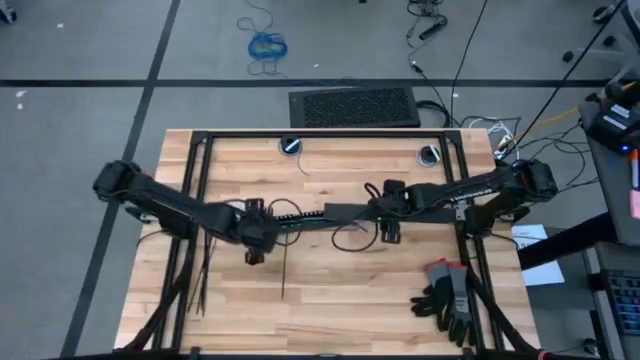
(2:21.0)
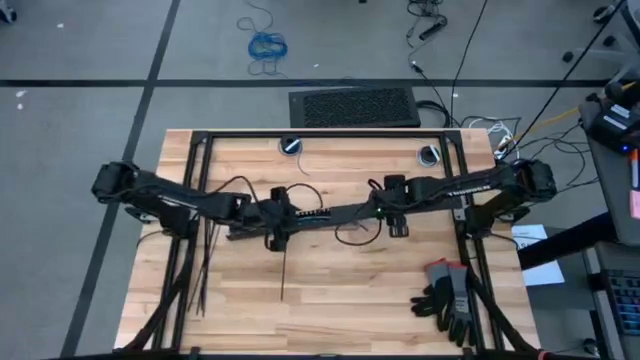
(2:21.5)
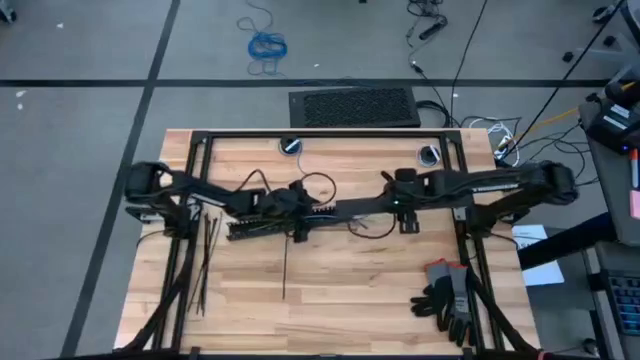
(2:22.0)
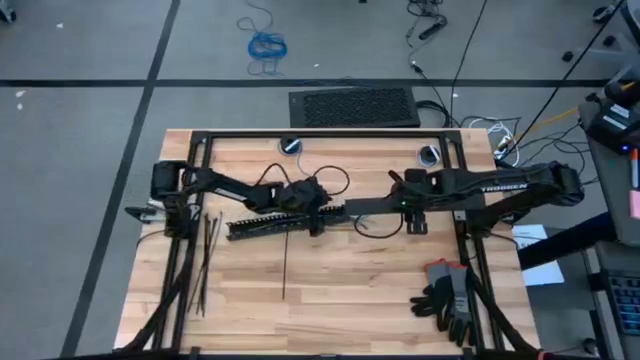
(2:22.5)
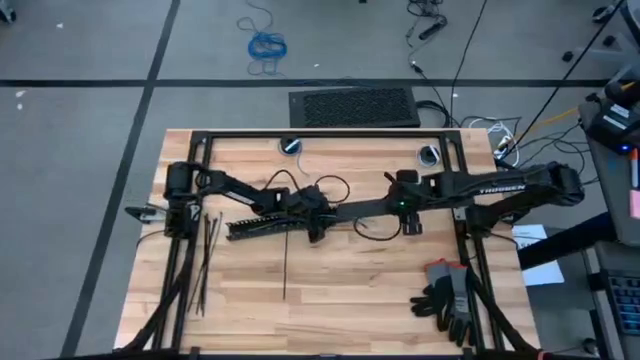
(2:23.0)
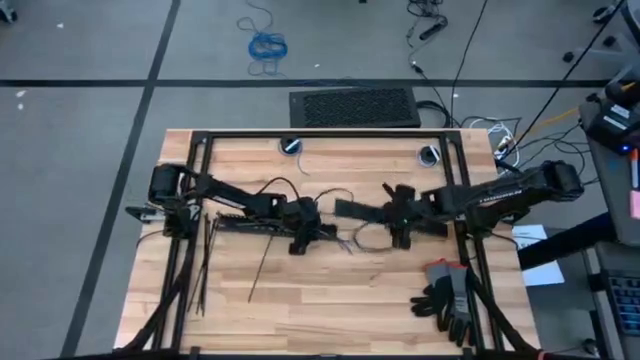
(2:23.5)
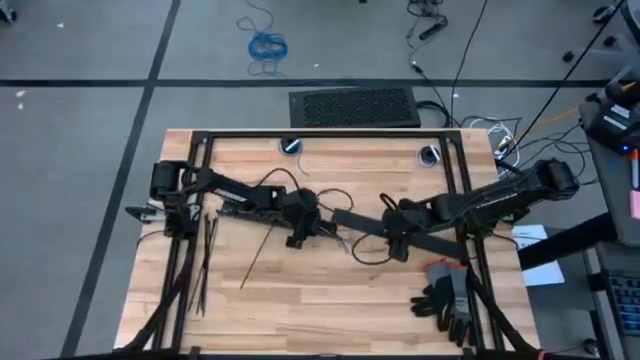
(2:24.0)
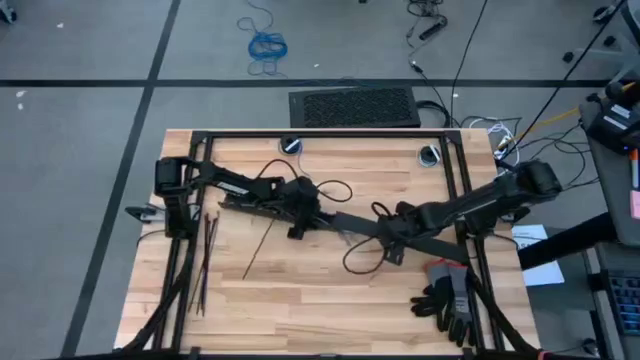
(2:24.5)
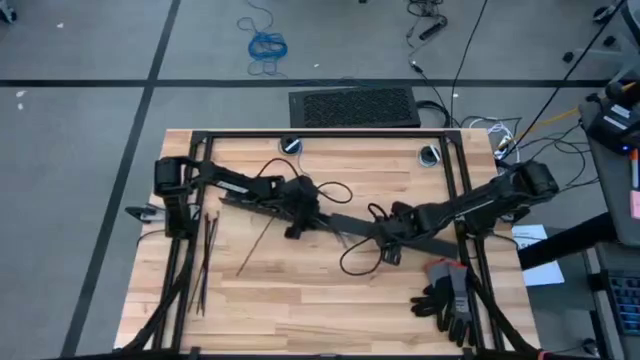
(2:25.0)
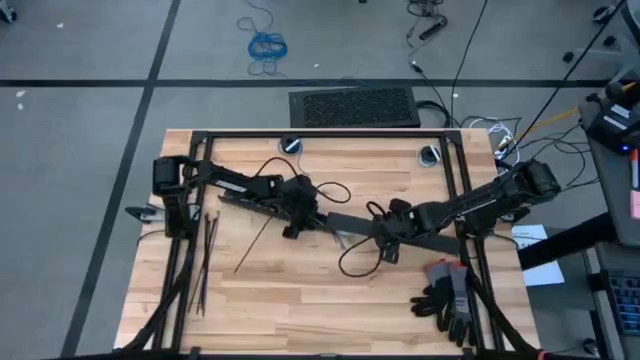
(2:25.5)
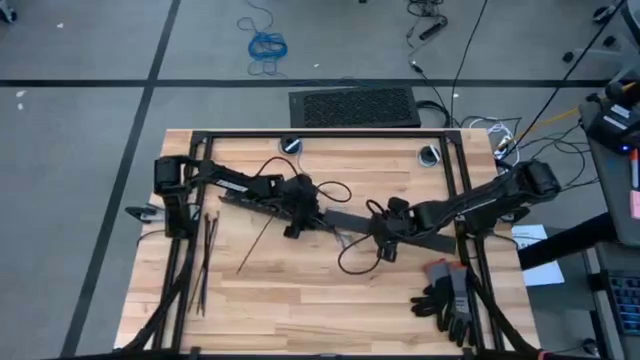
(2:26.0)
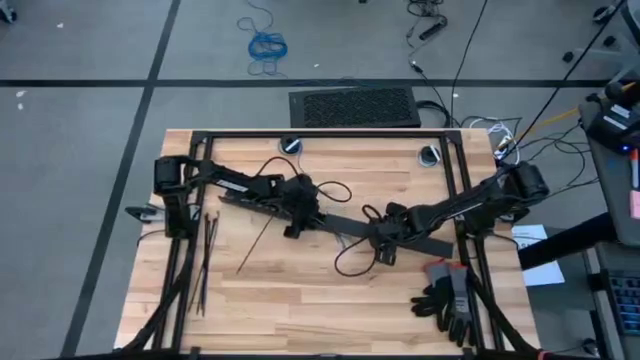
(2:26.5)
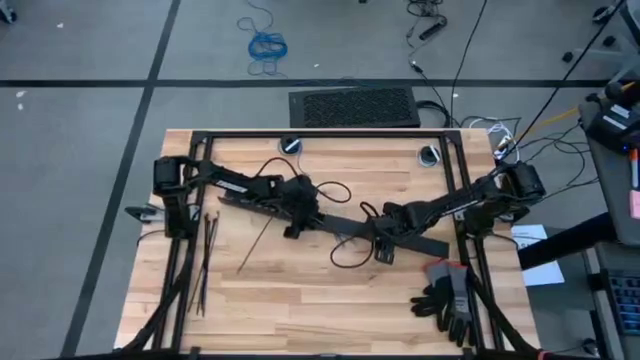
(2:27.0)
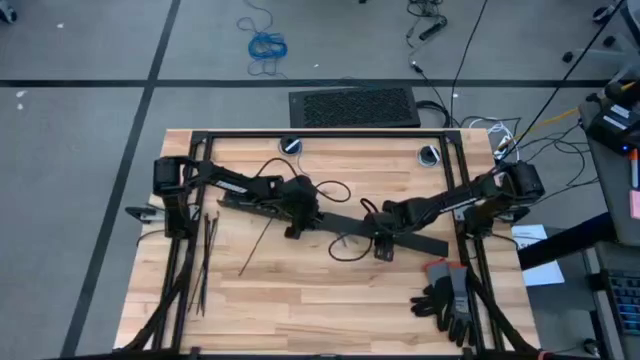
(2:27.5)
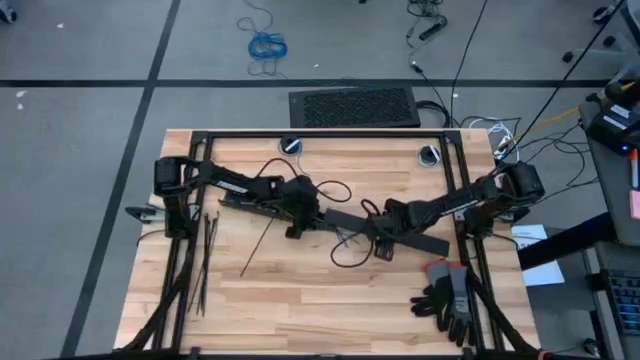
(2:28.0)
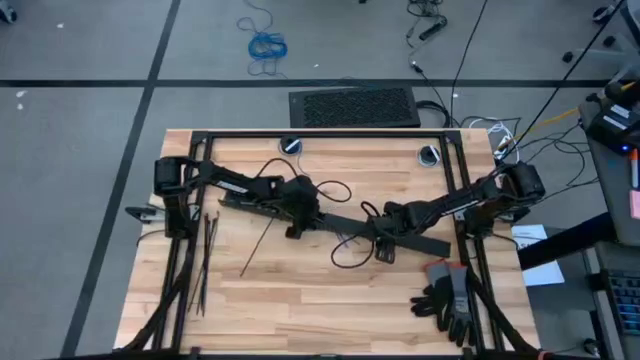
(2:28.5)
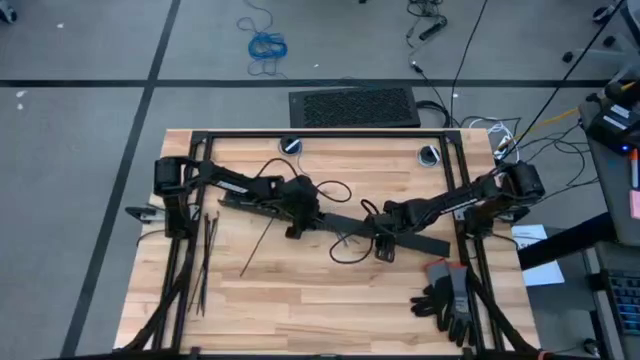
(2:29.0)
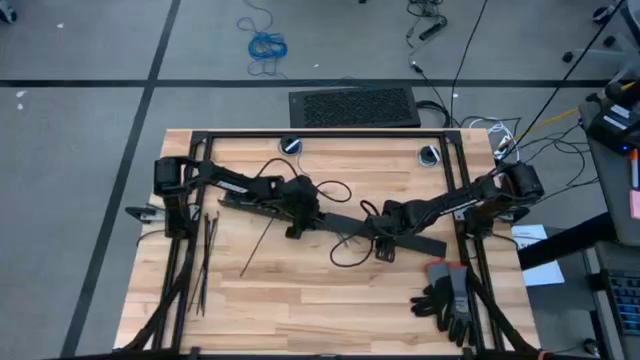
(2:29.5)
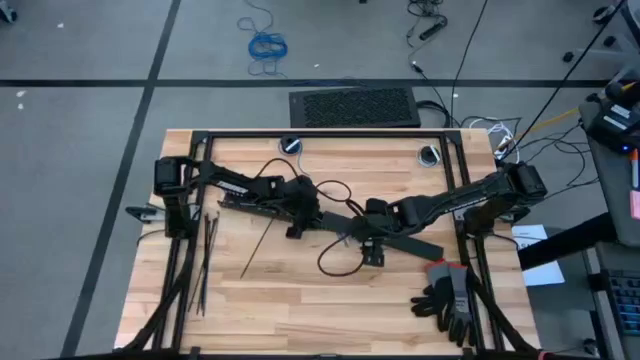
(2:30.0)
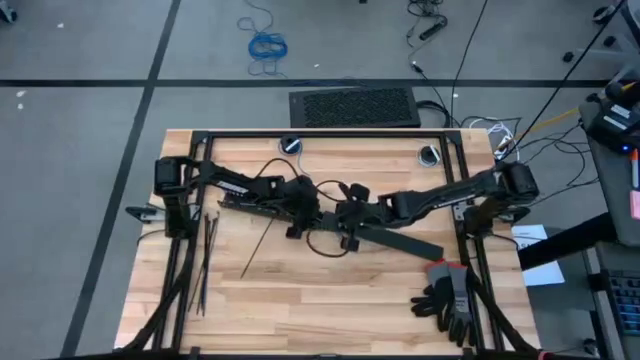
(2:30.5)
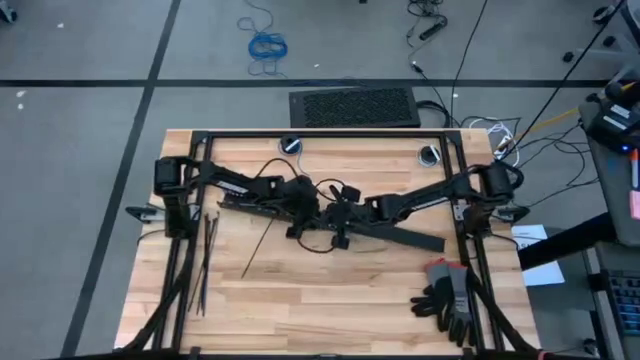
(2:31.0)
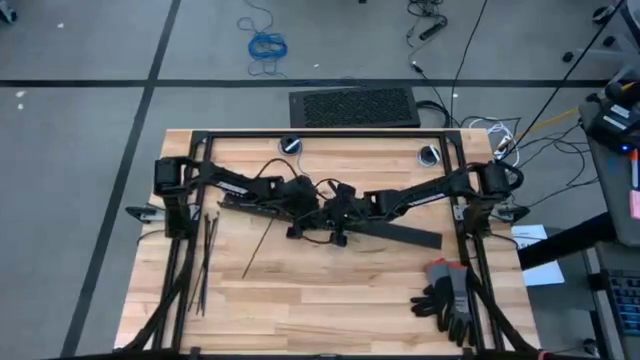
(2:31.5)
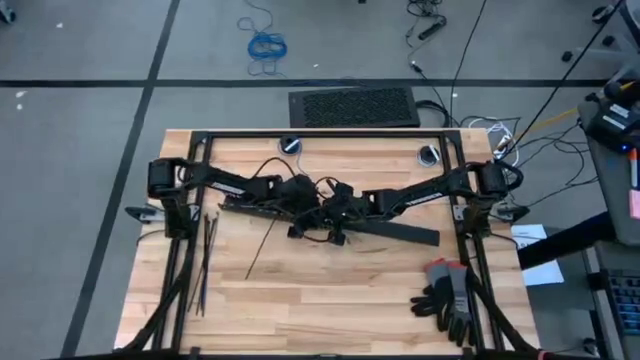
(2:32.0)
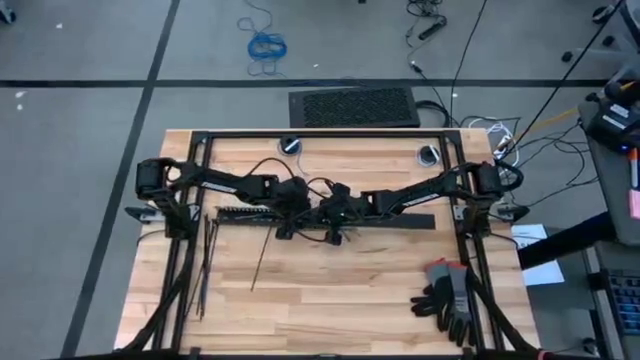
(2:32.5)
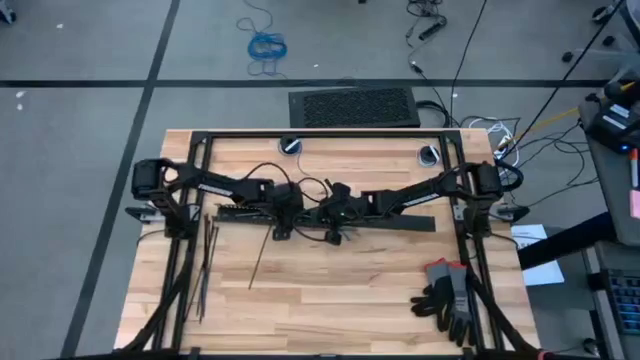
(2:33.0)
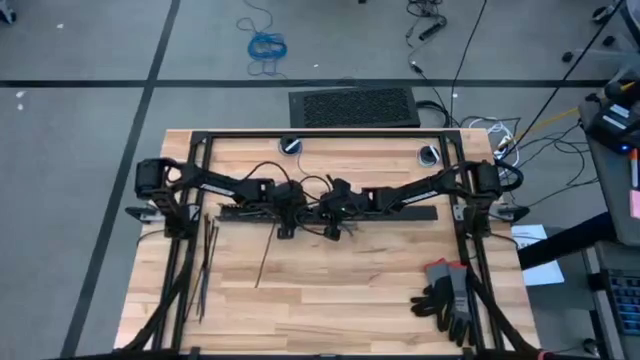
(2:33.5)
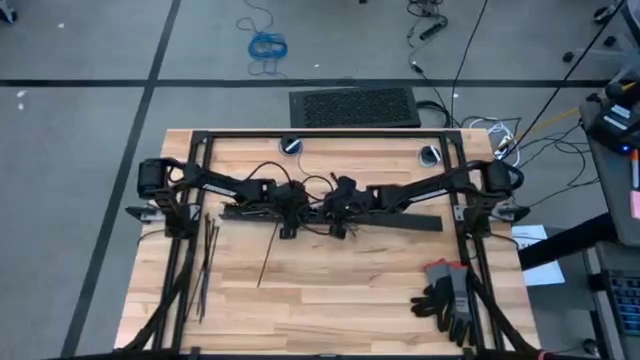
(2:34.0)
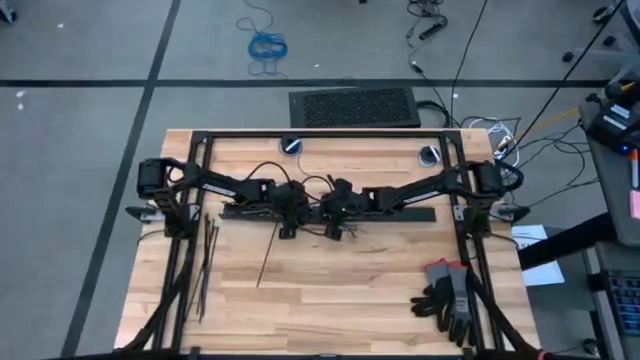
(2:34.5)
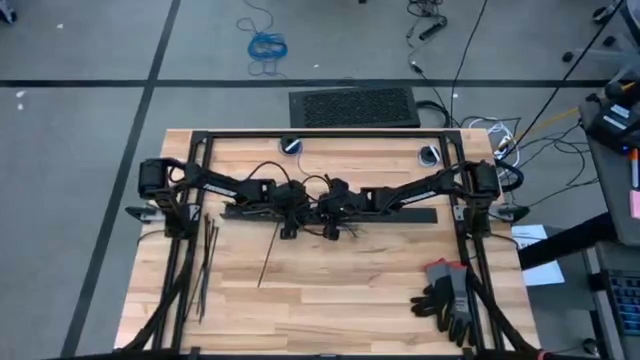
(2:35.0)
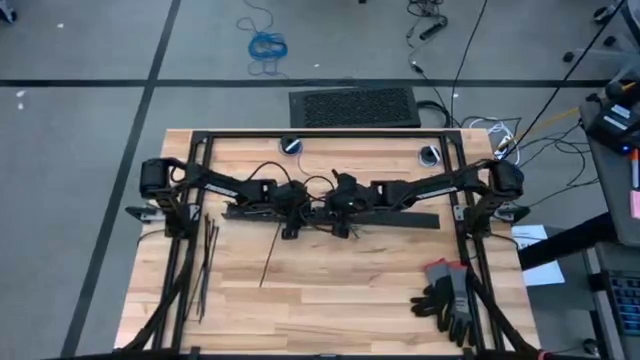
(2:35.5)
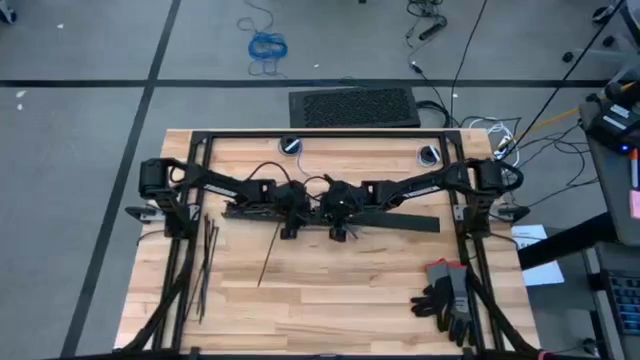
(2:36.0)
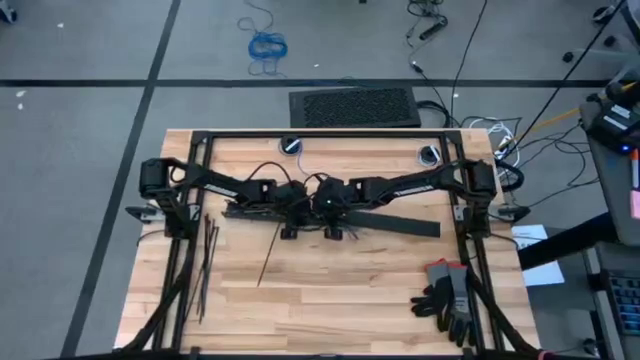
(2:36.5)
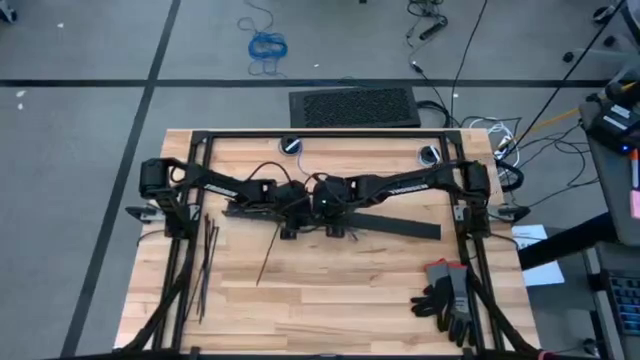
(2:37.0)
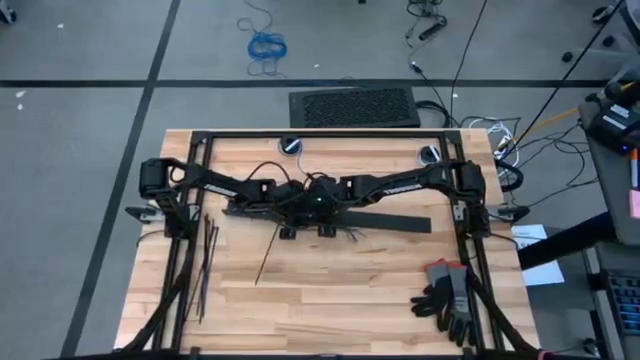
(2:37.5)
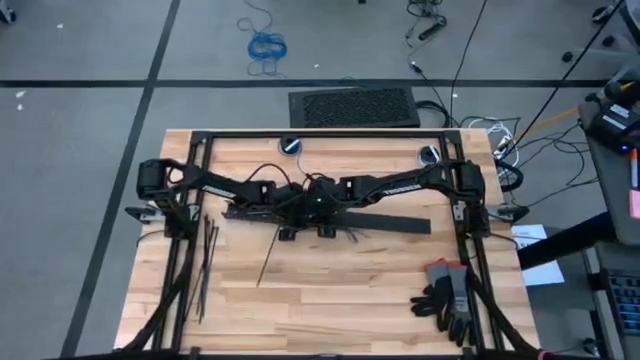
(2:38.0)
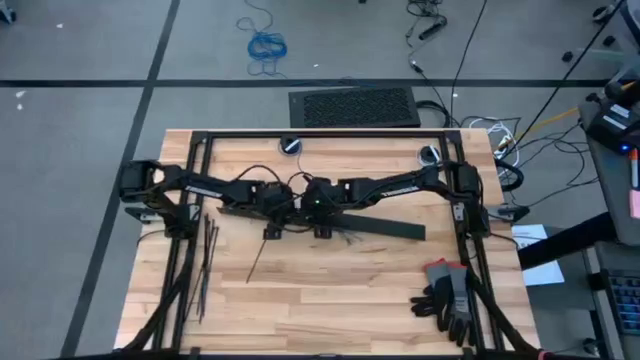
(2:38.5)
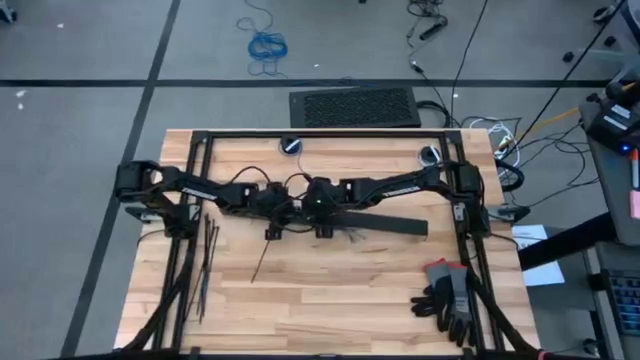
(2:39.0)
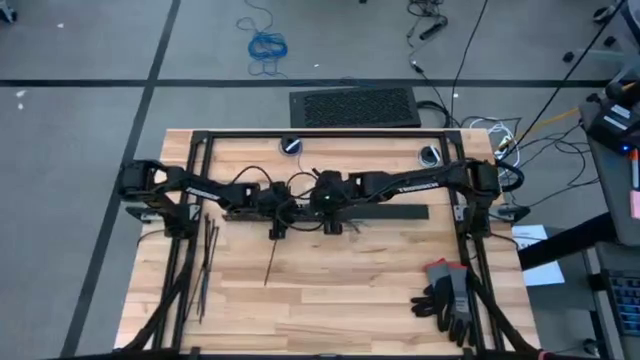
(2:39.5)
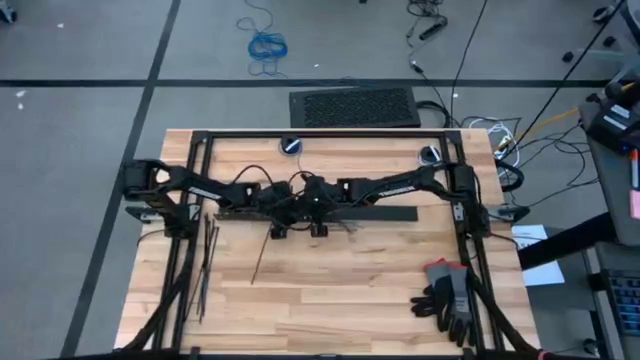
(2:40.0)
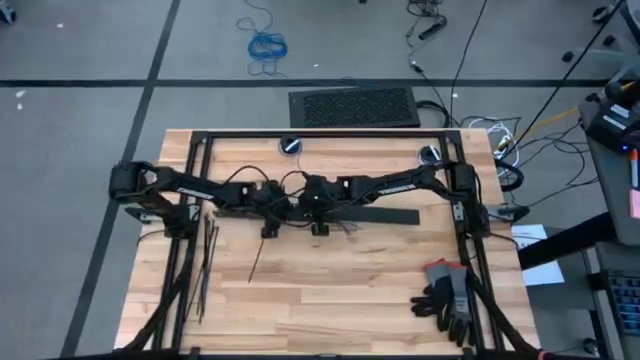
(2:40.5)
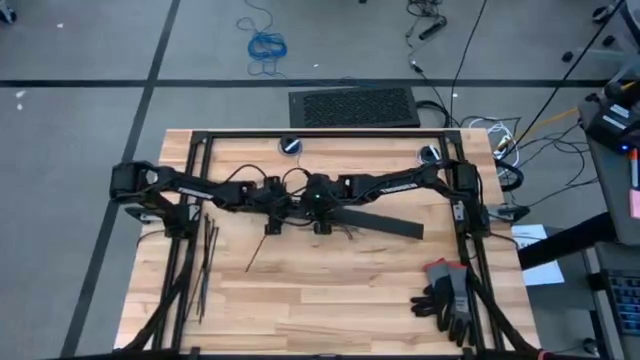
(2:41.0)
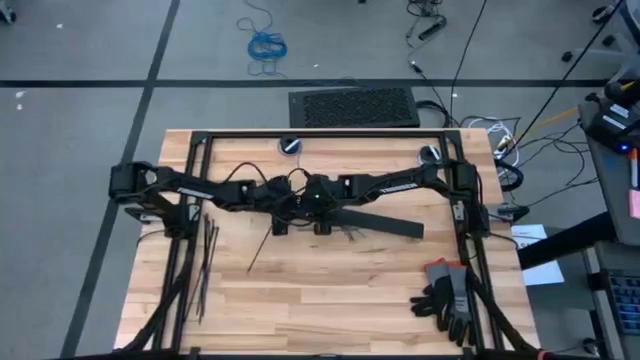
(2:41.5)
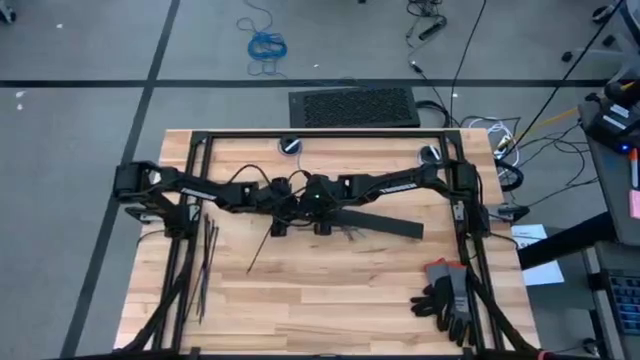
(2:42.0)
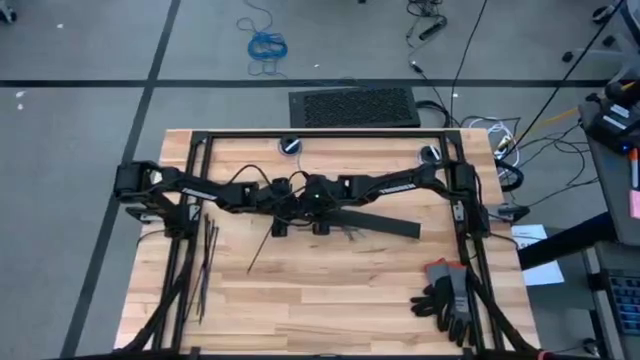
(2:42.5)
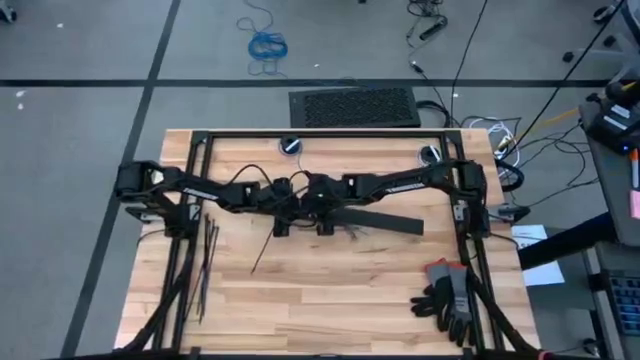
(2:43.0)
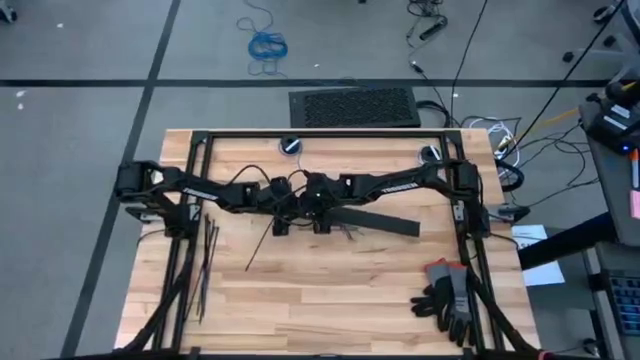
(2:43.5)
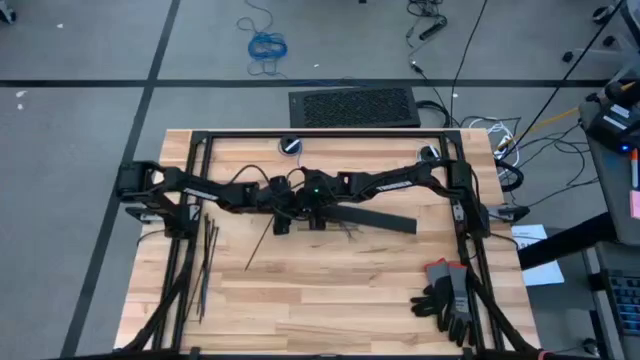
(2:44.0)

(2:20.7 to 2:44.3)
Task: Ziptie cables
Close the cable duct
